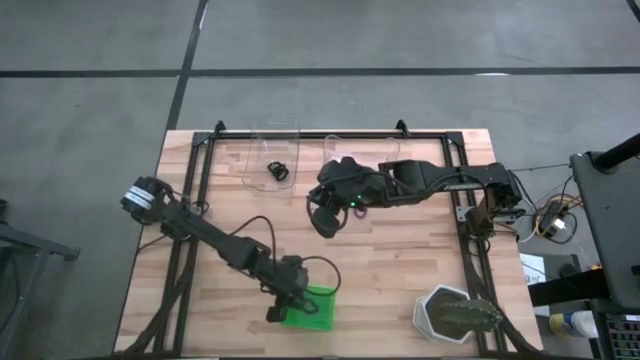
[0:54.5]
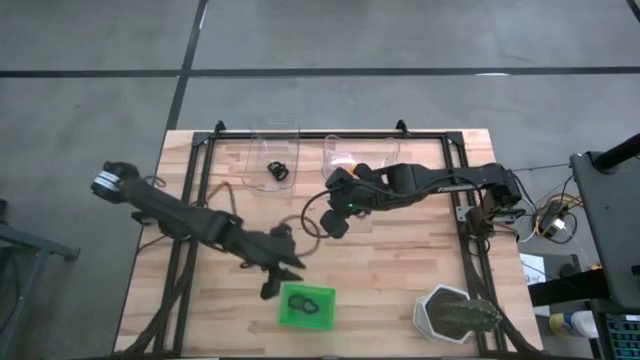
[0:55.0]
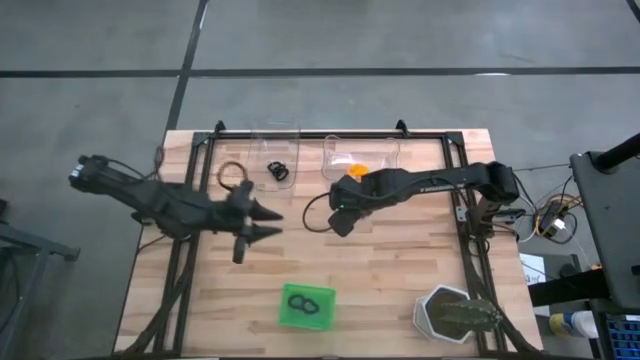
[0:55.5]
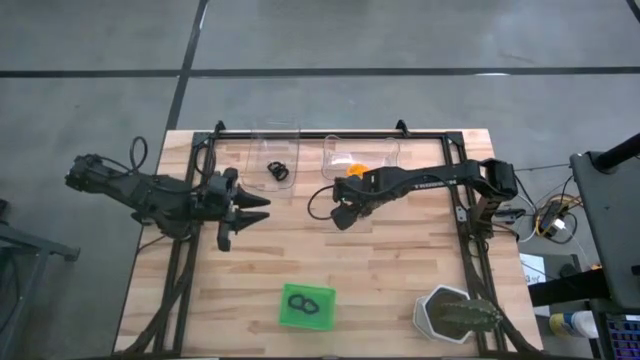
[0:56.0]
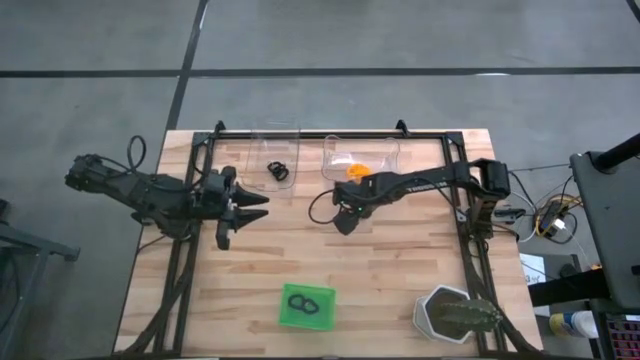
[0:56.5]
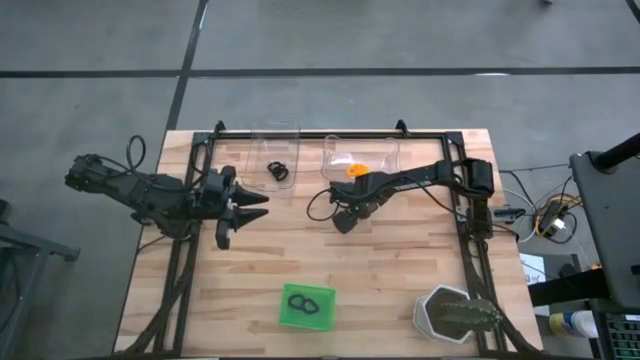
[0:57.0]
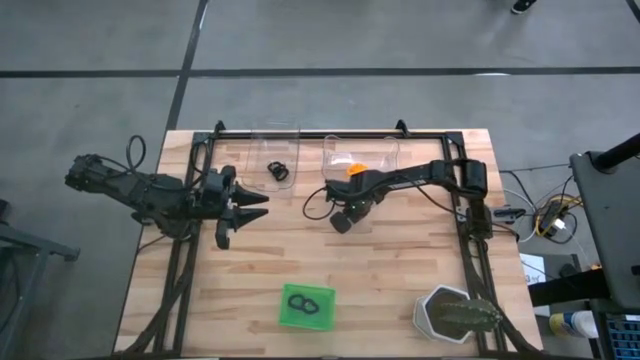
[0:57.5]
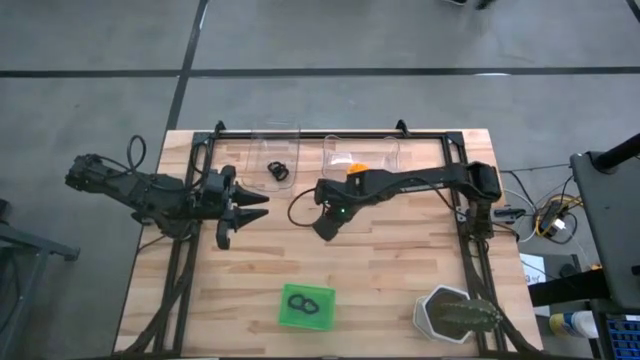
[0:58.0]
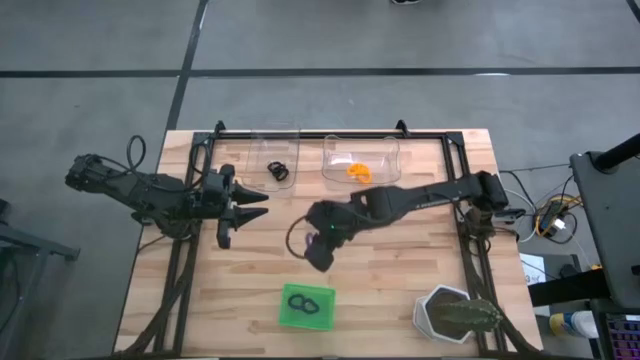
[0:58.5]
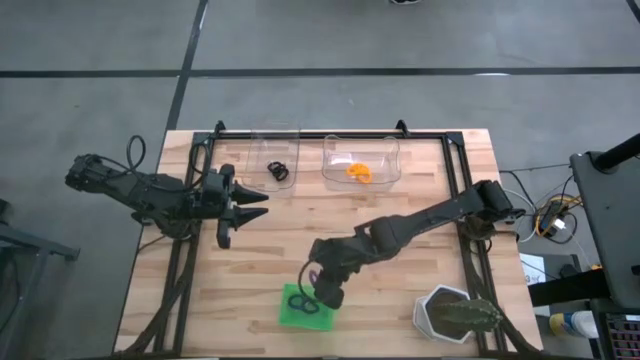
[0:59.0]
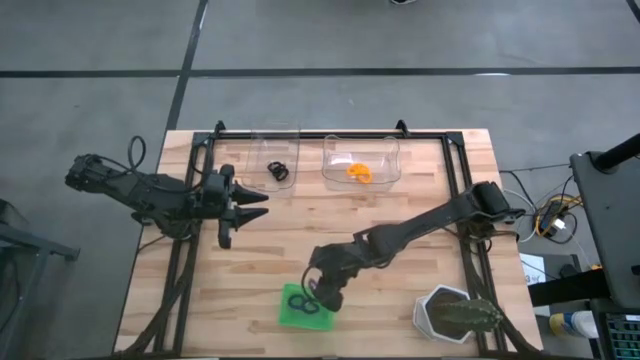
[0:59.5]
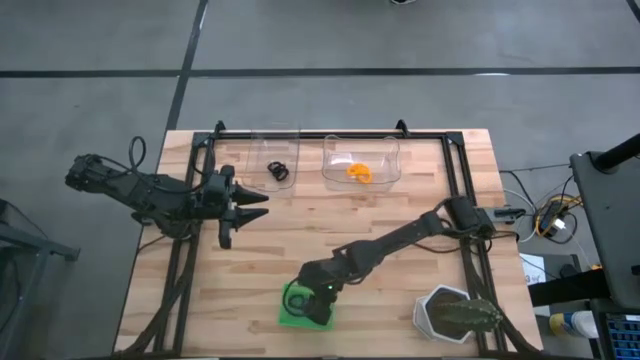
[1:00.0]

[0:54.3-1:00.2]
Task: Sort spring keychains
Put the violet spring keychain into the green bin

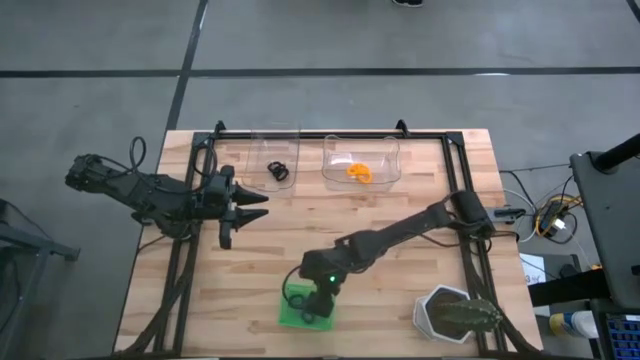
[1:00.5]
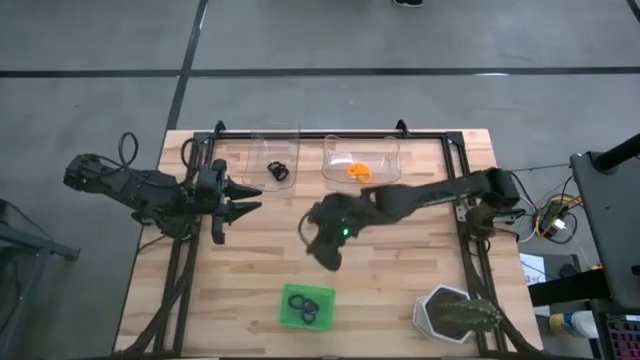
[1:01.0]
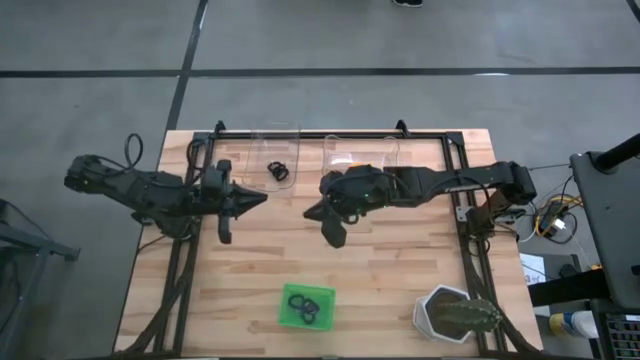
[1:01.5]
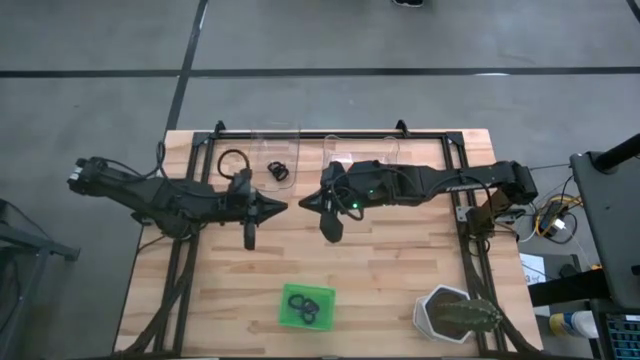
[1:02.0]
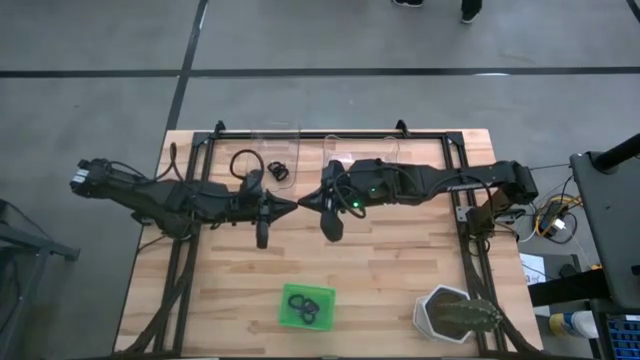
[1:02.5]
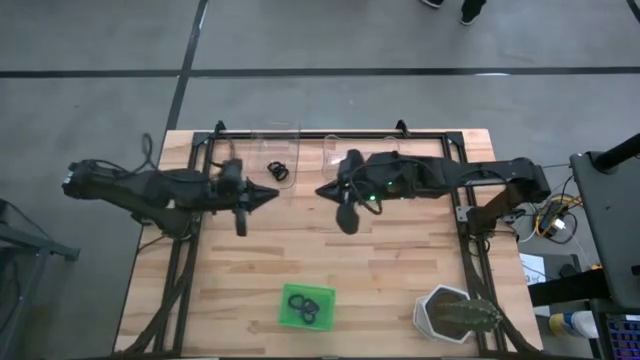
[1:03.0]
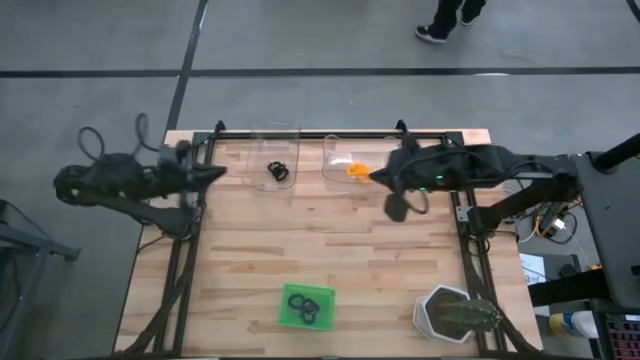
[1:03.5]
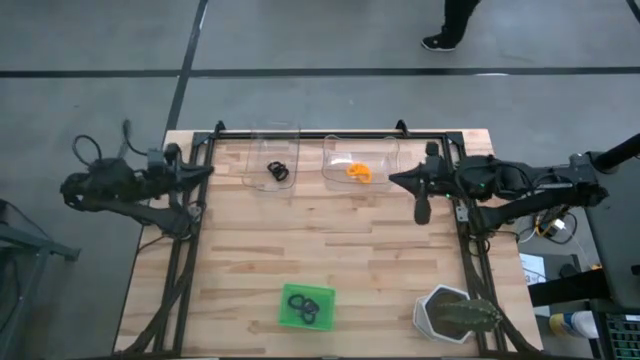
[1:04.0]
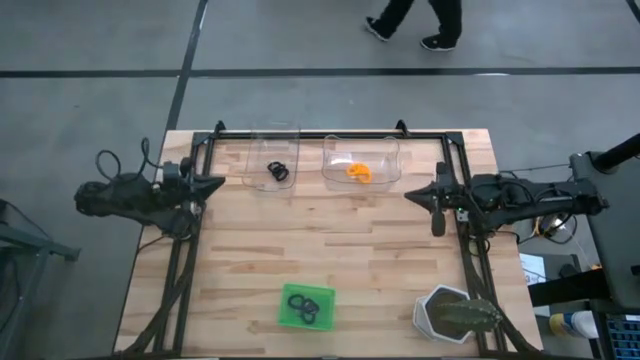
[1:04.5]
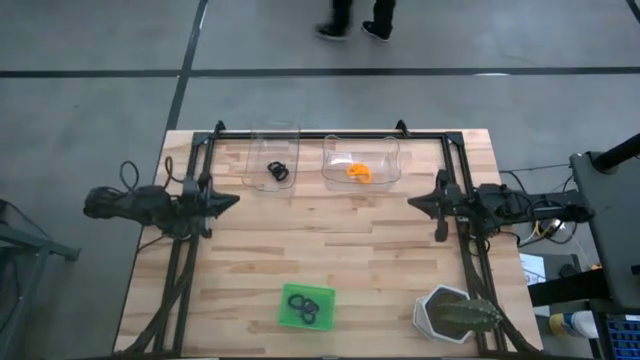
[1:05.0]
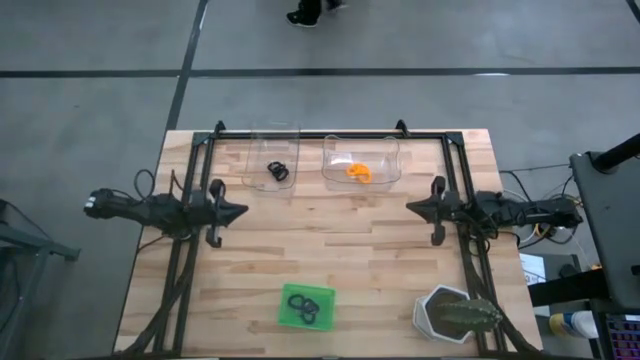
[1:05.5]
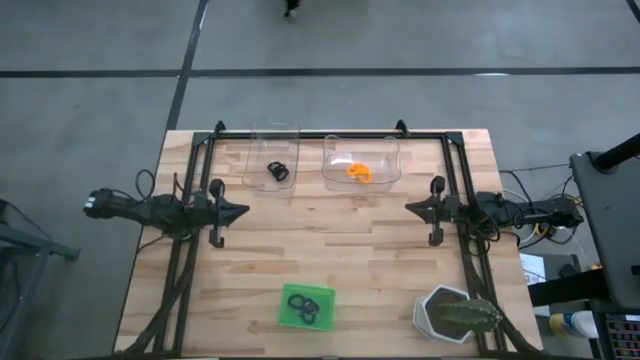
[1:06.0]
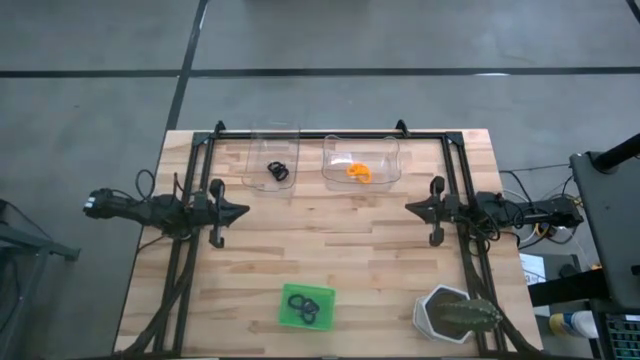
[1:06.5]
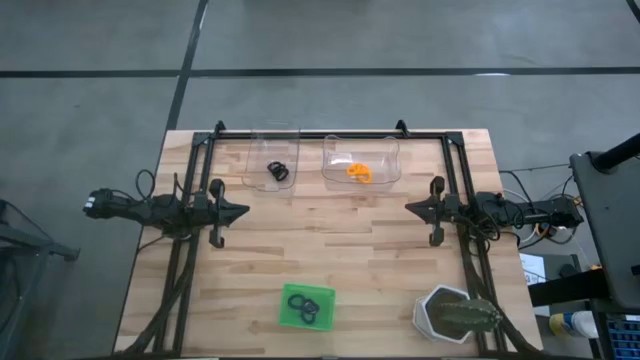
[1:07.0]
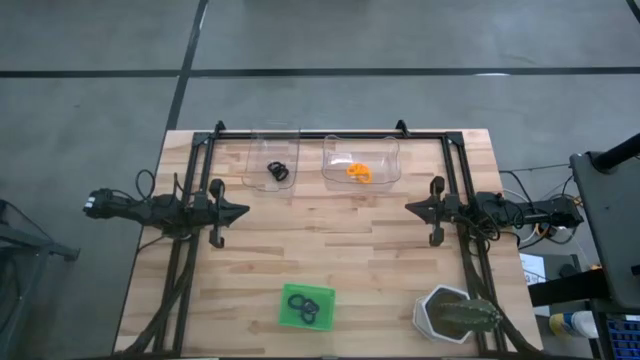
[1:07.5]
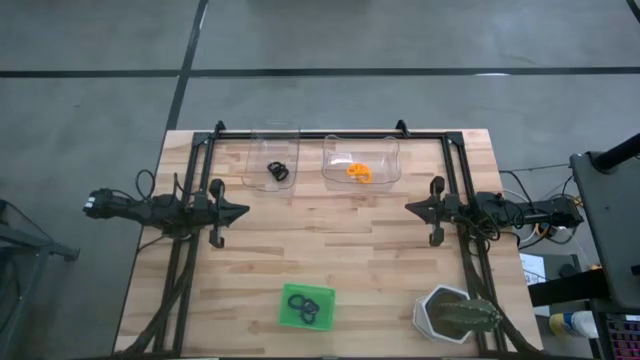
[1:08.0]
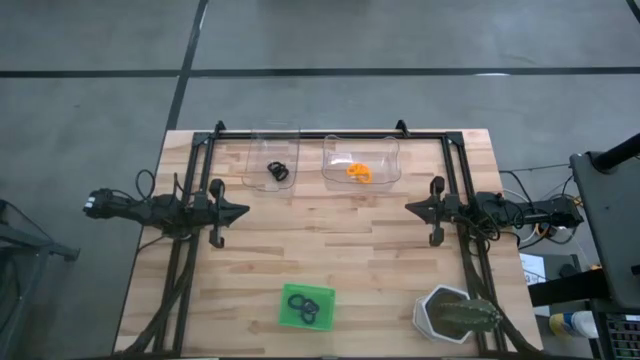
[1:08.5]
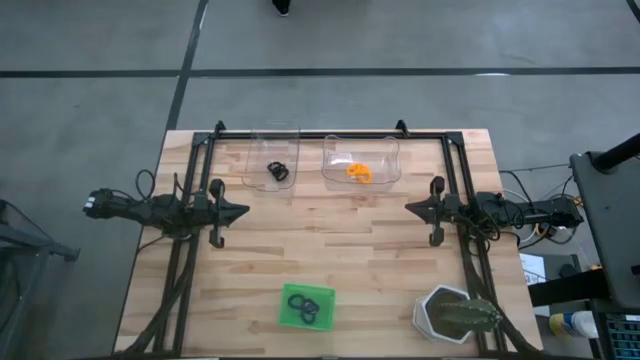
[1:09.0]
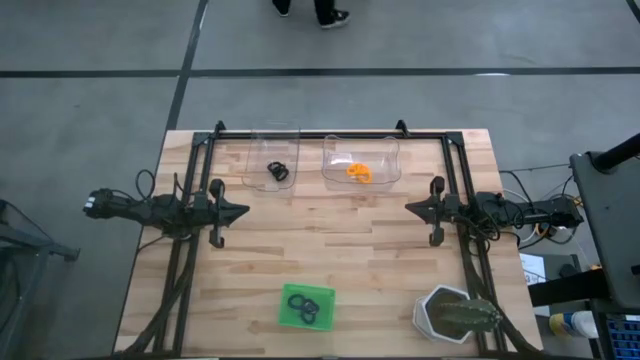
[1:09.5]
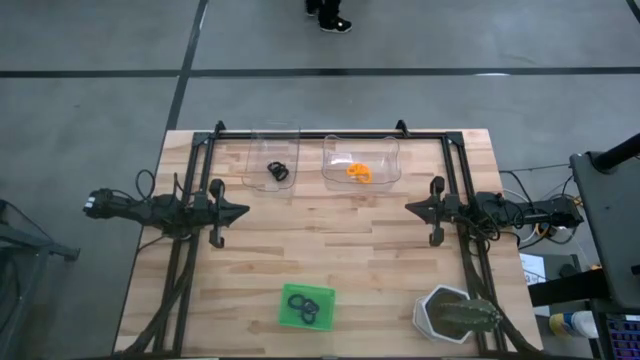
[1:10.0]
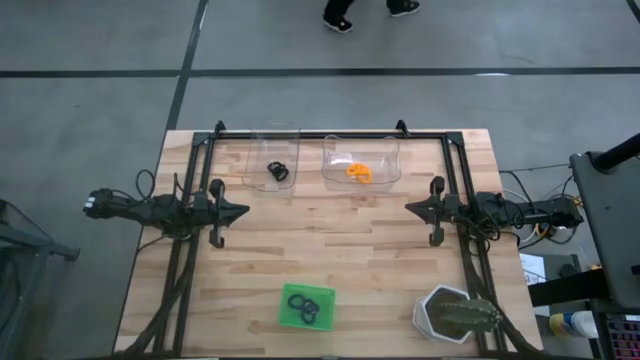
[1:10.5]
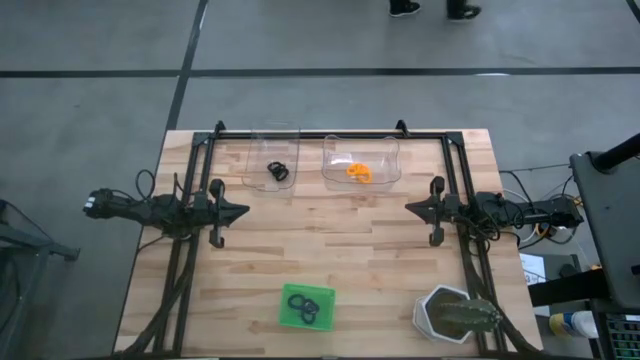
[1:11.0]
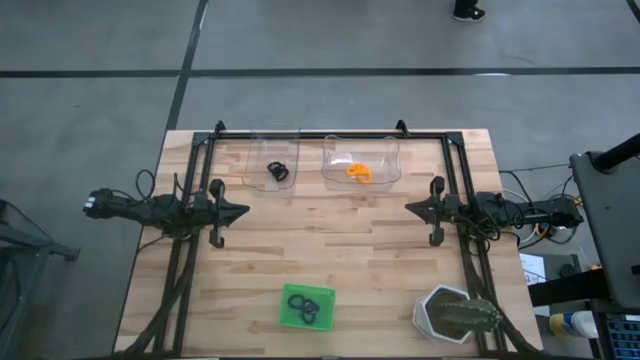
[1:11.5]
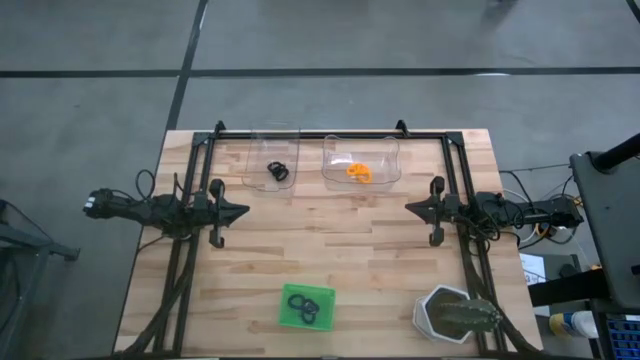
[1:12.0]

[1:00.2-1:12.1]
Return to Home Position

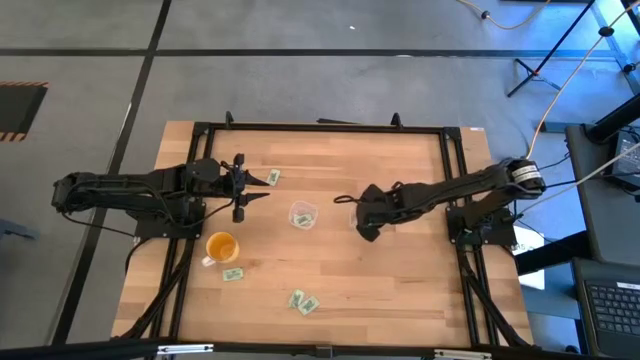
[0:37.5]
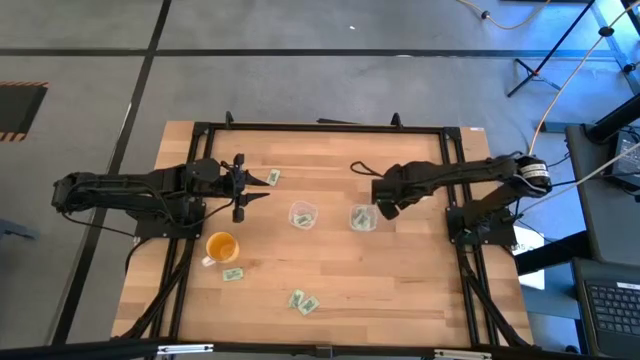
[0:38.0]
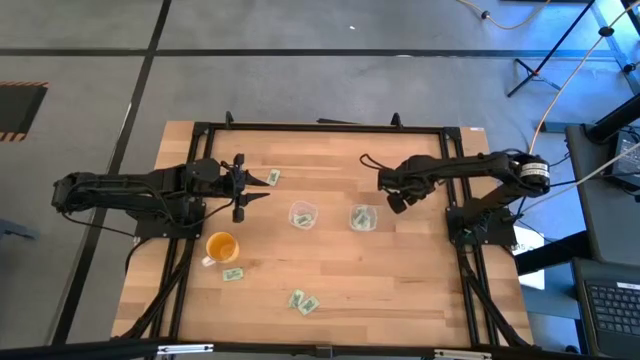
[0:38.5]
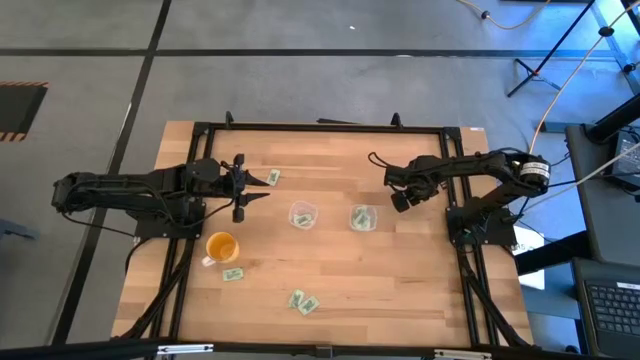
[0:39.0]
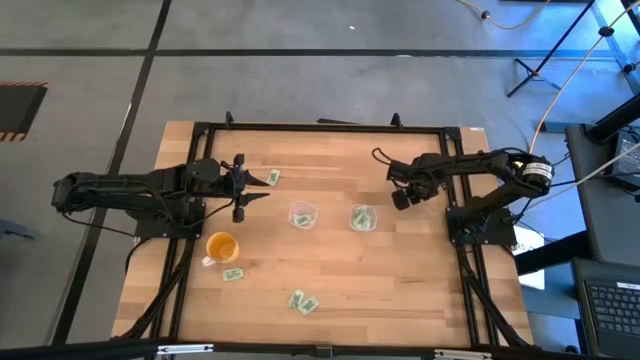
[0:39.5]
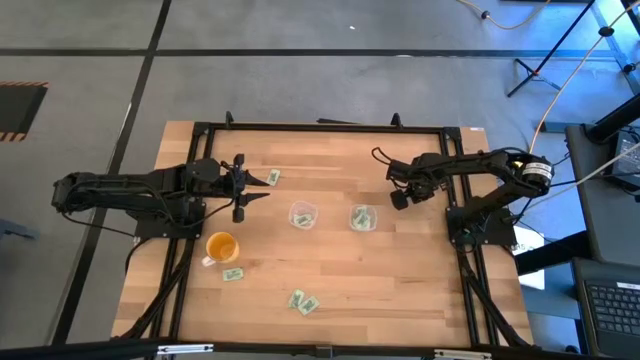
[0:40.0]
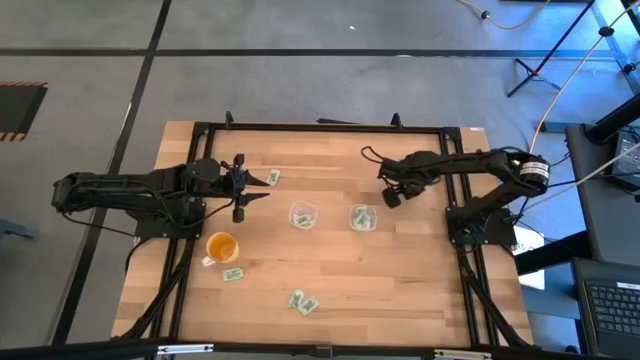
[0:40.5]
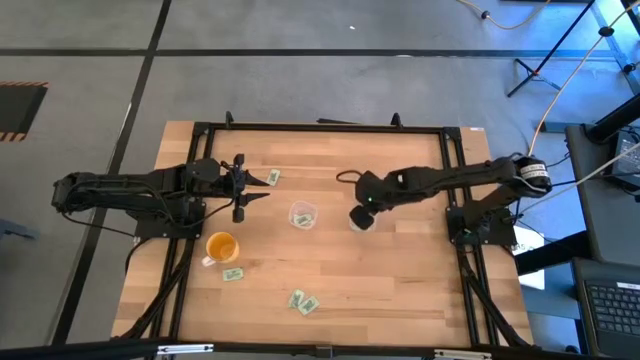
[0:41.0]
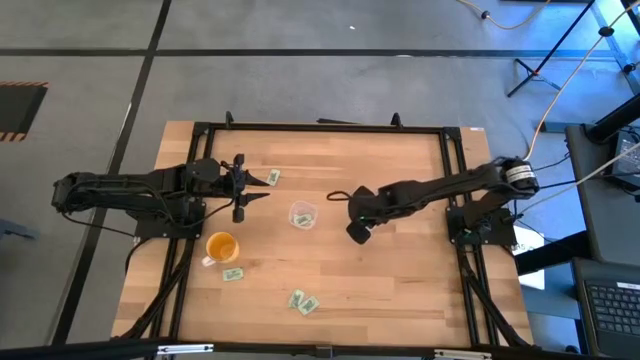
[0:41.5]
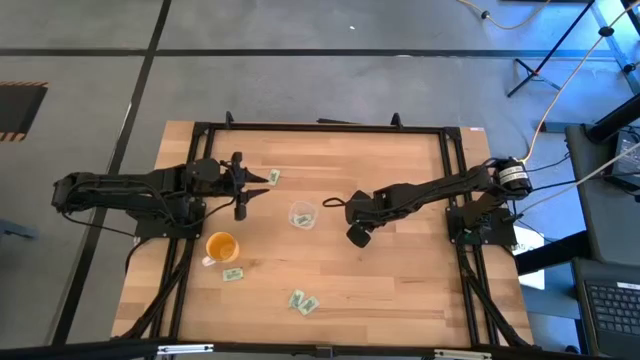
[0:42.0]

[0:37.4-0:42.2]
Task: Pick and place Stevia / Truvia into bins
Put the stevia packet into the right transparent container
